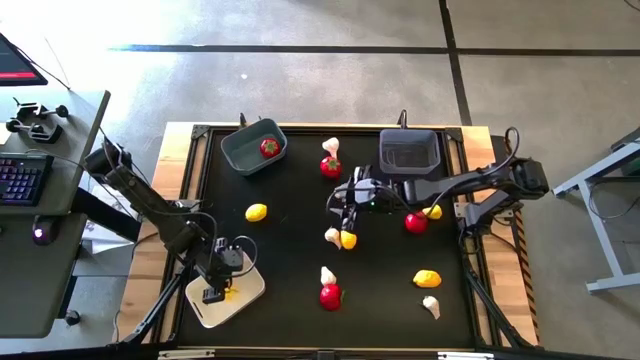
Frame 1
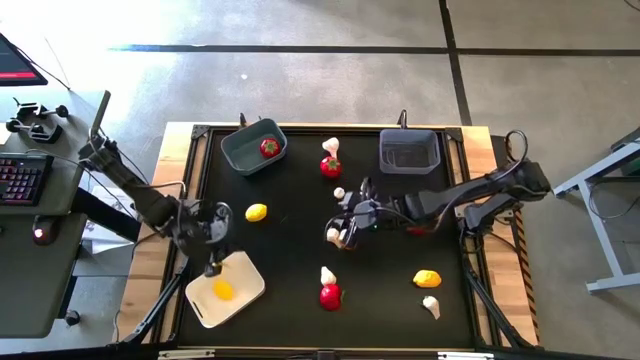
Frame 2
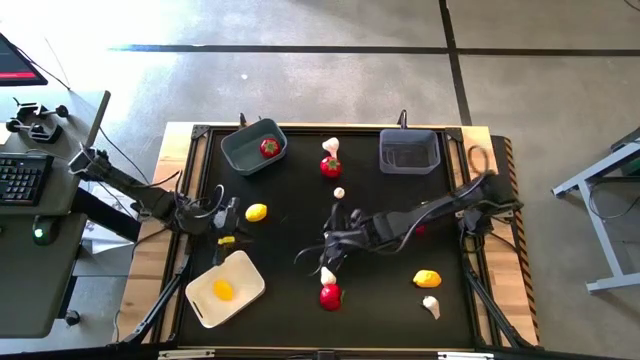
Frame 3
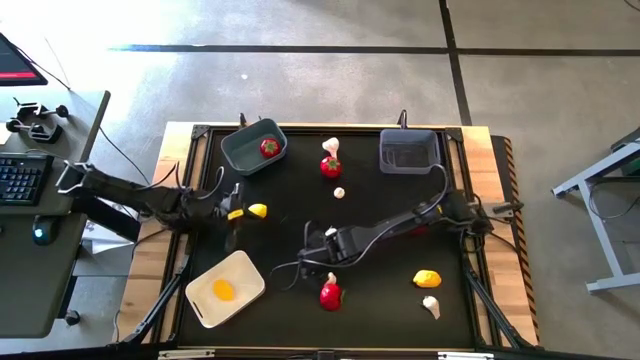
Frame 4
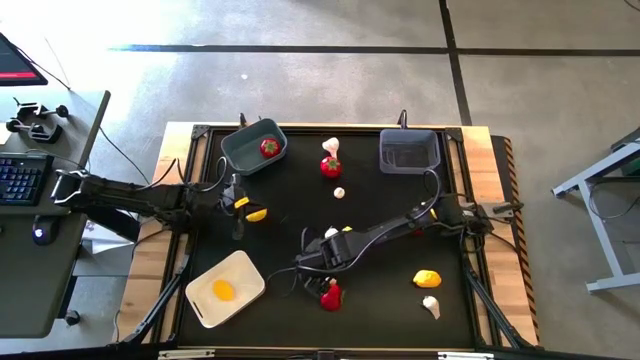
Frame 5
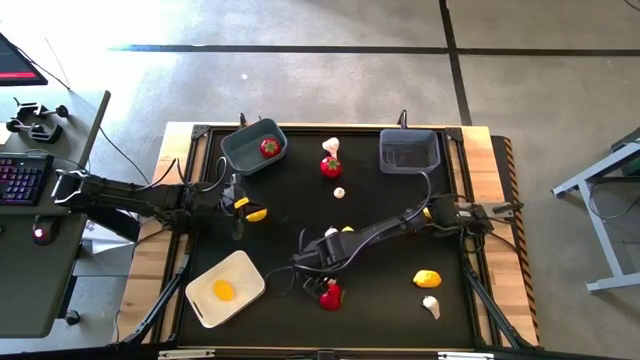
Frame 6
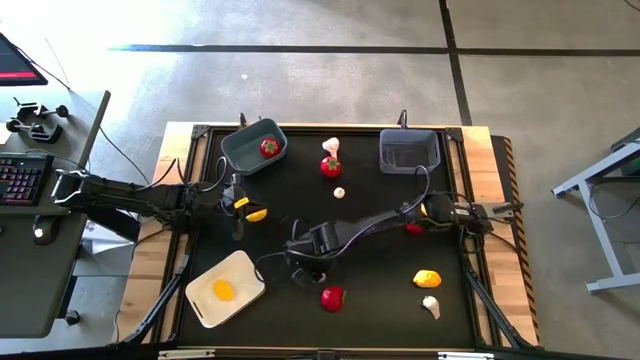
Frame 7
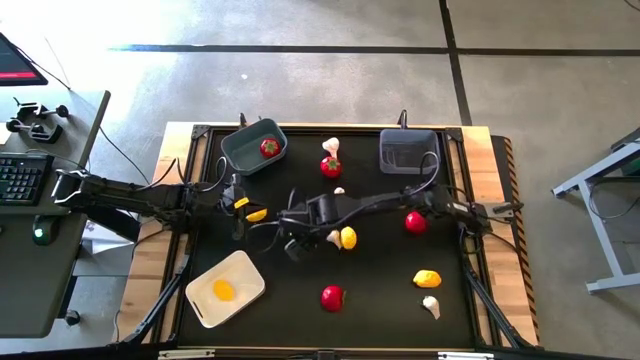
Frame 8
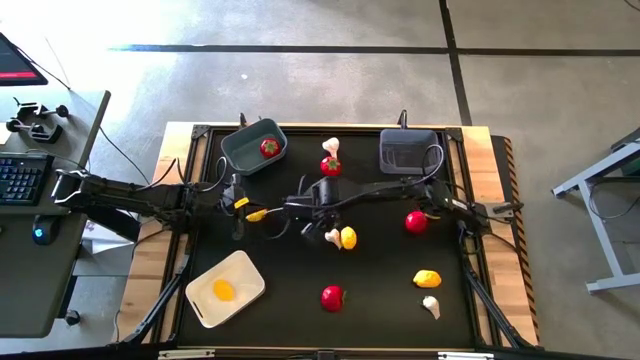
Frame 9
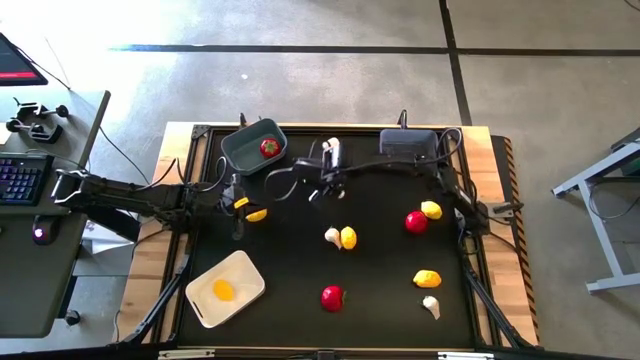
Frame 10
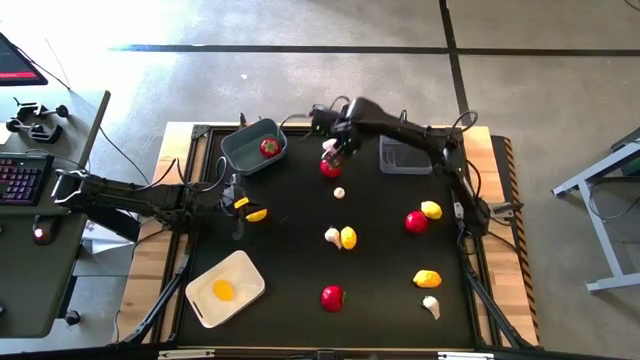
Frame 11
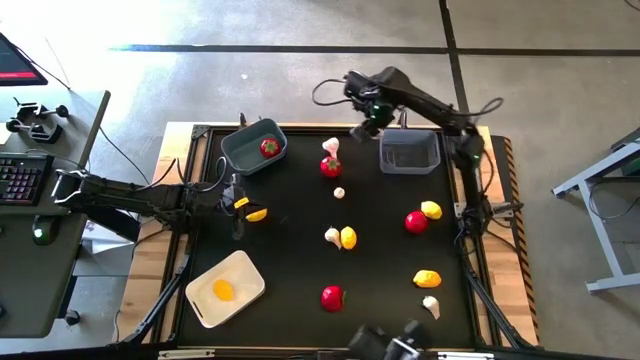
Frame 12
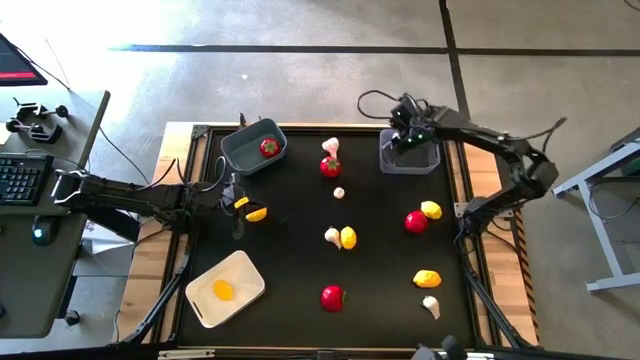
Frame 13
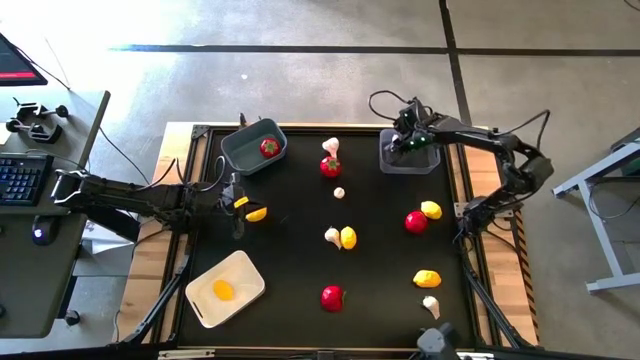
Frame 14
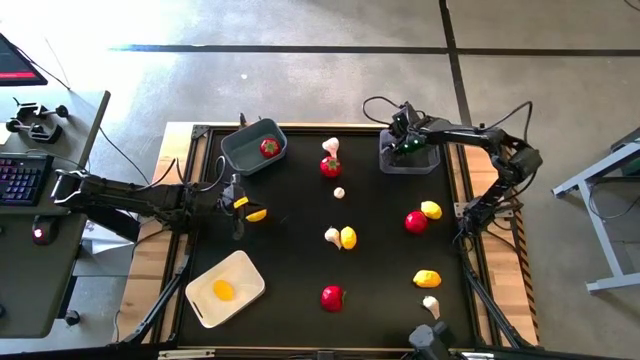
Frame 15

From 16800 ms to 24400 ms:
Task: Sort produce into baskets
Put the white garlic into the transparent bin

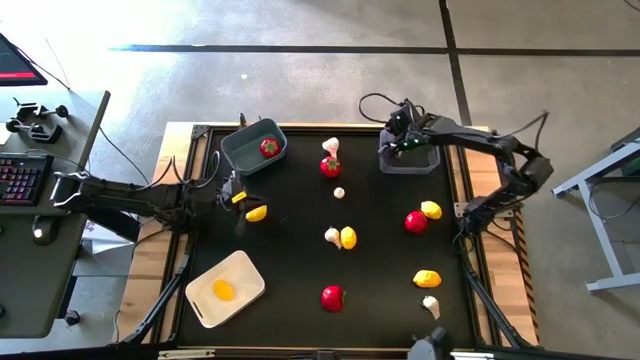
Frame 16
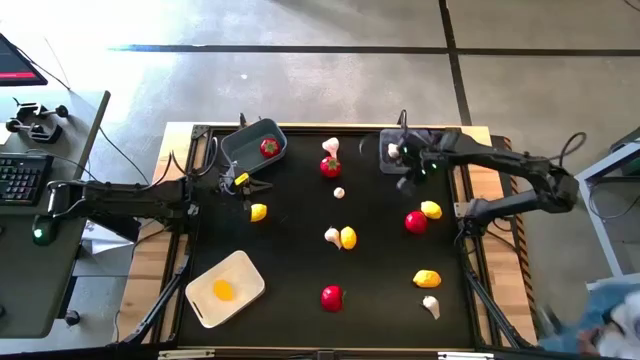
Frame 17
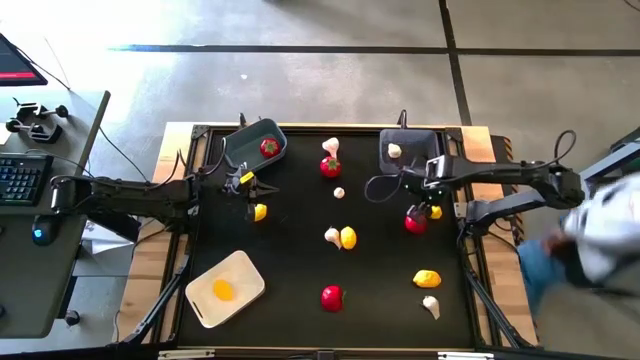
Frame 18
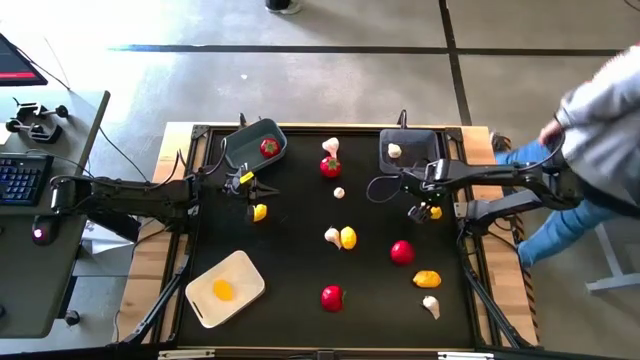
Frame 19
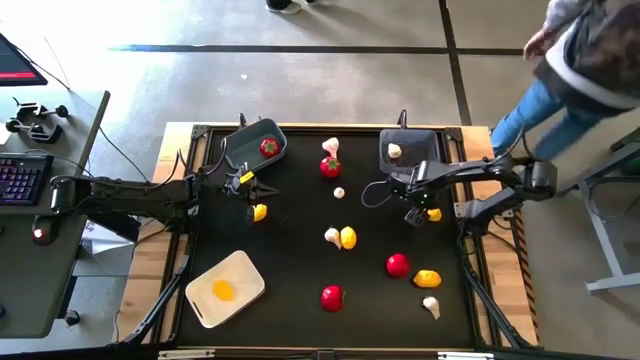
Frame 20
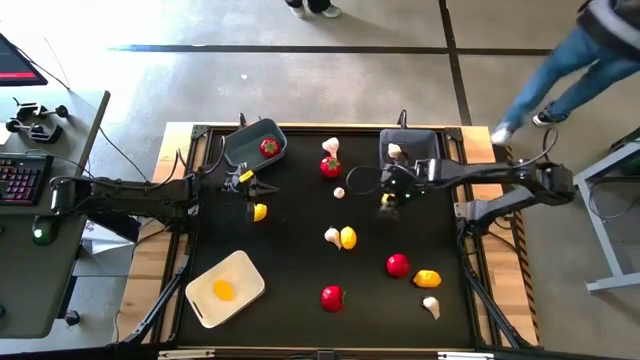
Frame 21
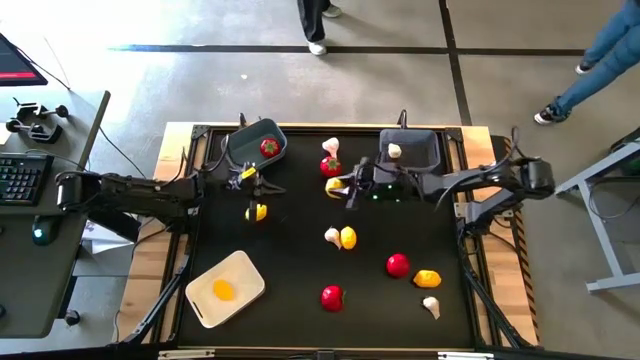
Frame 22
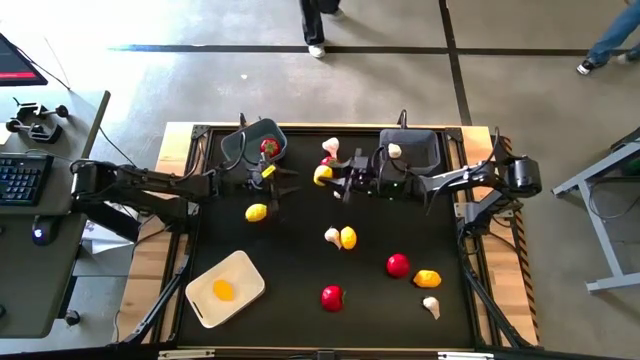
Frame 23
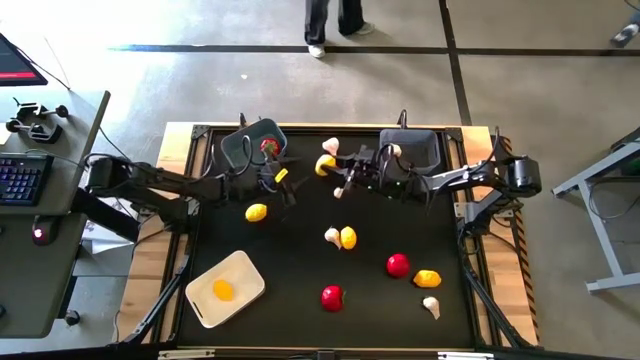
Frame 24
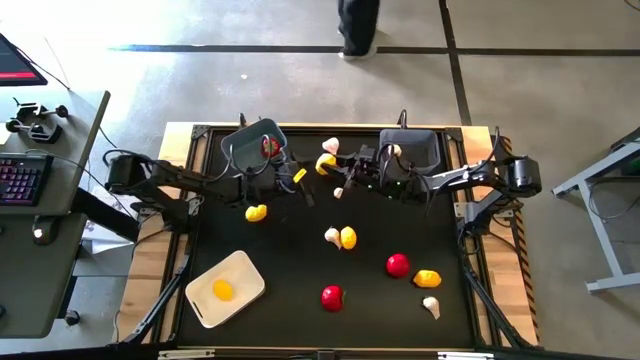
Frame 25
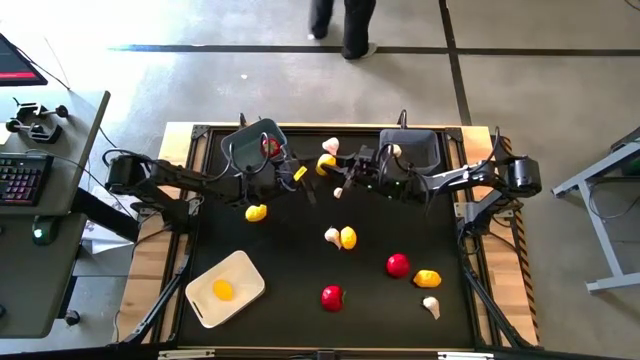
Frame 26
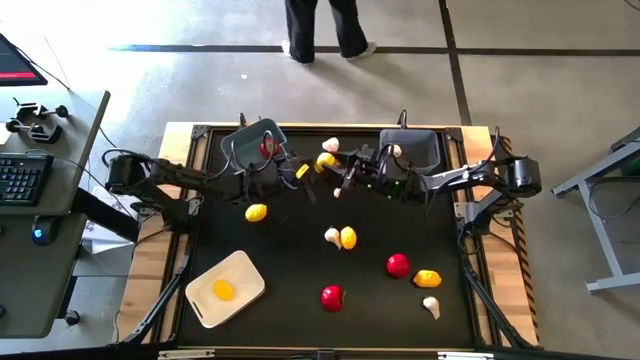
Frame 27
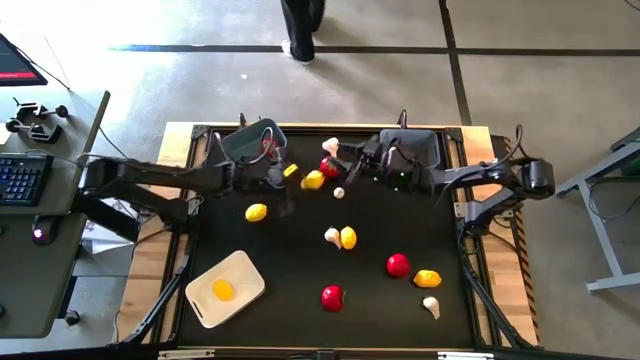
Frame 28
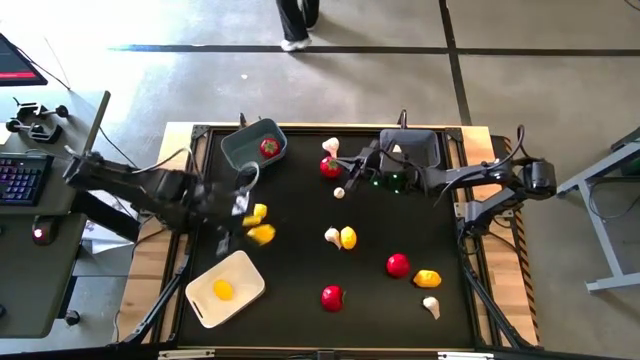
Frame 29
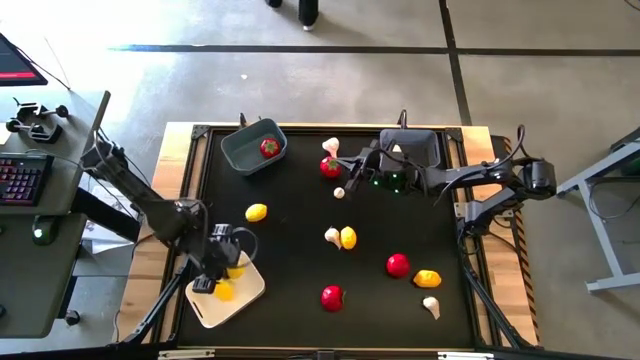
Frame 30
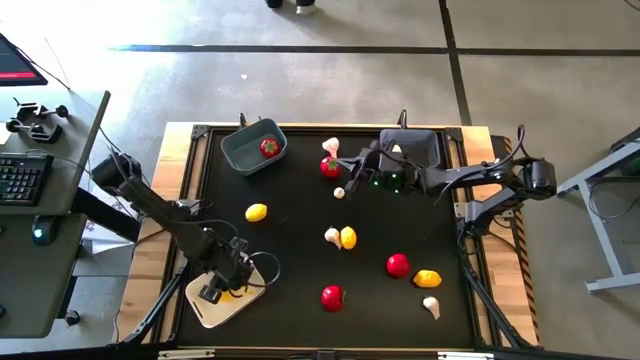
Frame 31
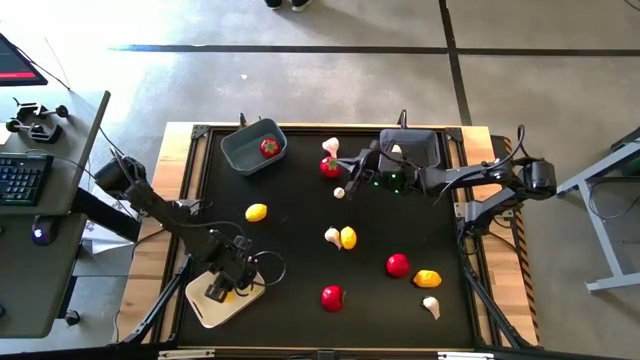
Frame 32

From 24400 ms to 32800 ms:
Put the yellow lemon into the white bin

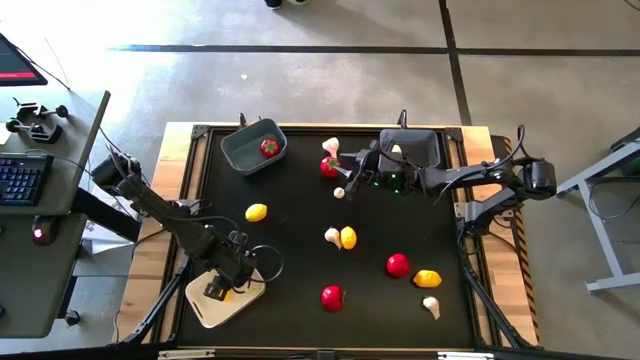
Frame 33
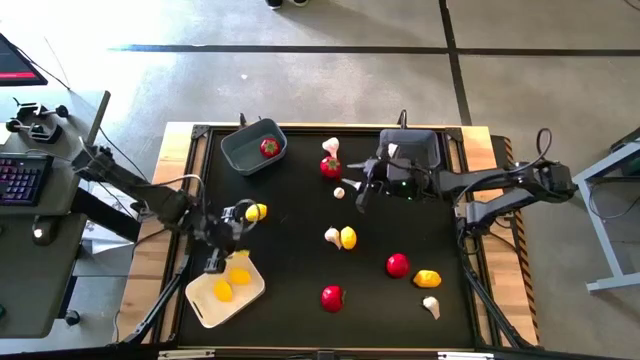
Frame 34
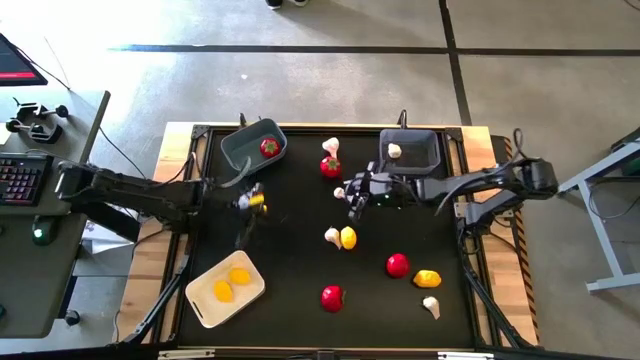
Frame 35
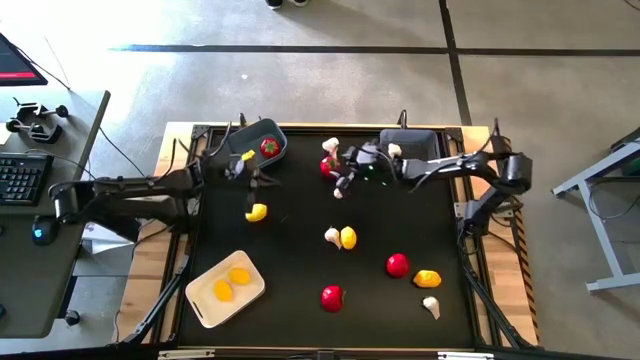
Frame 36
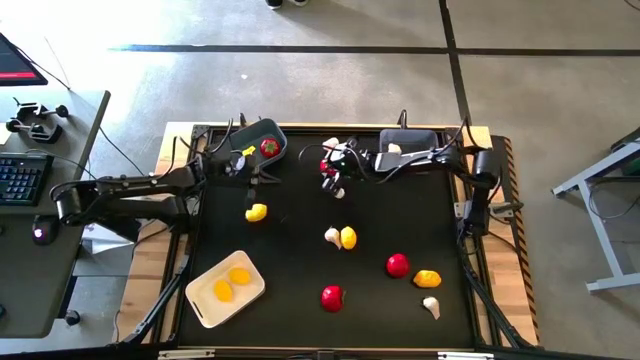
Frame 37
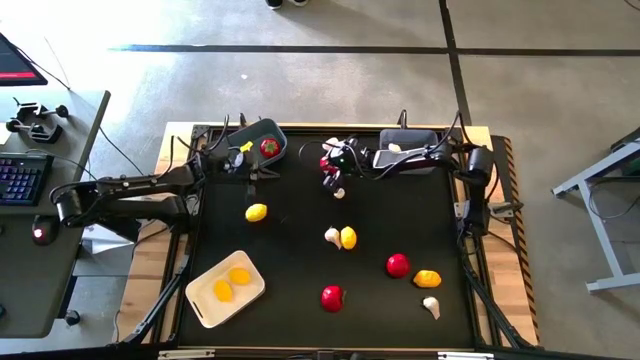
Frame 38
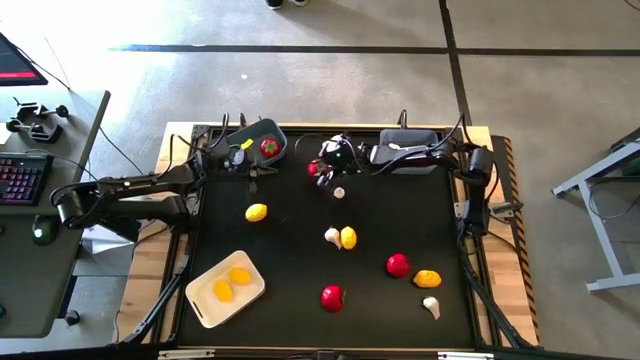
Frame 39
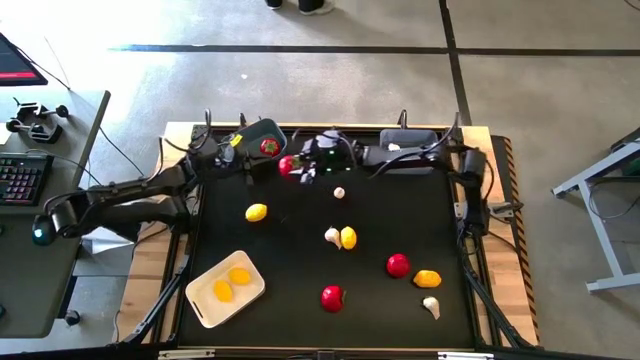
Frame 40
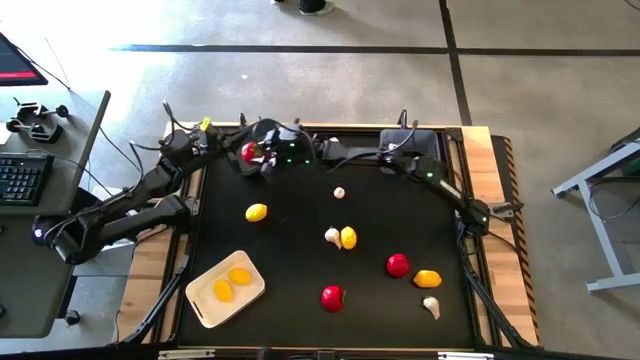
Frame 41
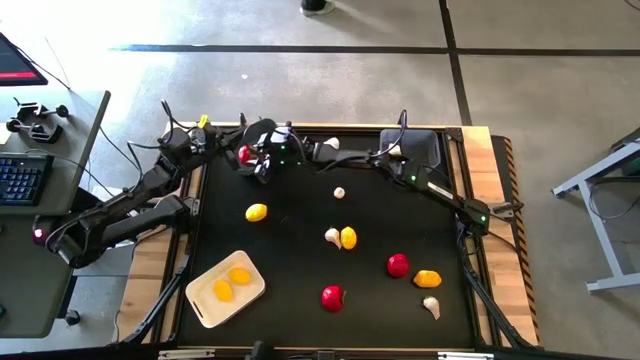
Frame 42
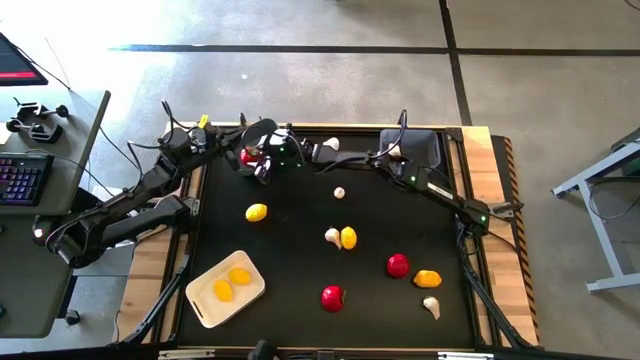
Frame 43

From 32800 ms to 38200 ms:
Put the red tomato into the white bin
